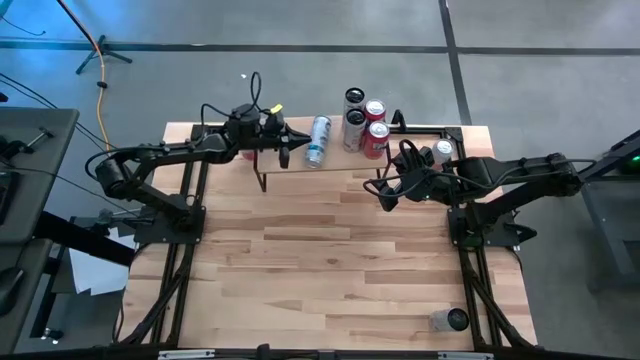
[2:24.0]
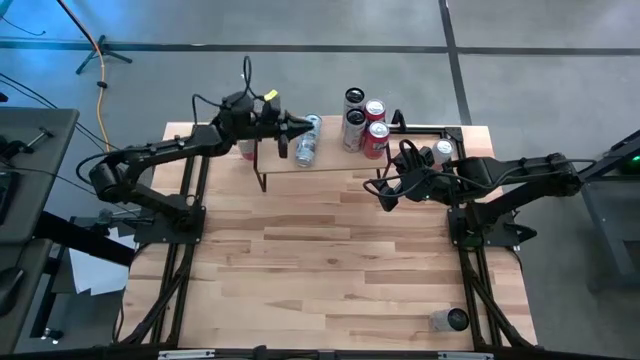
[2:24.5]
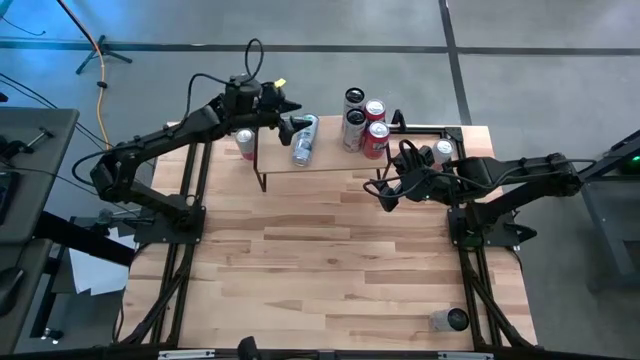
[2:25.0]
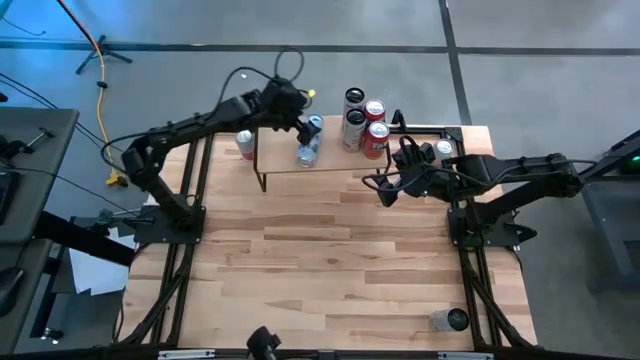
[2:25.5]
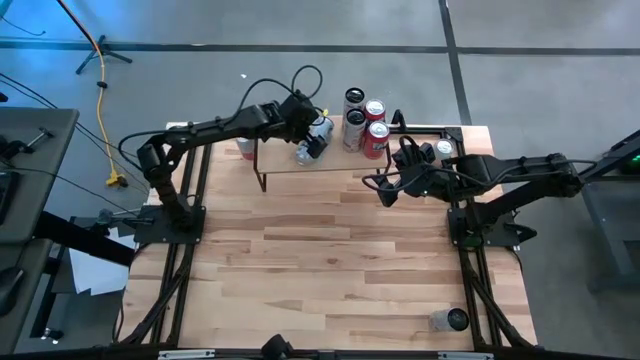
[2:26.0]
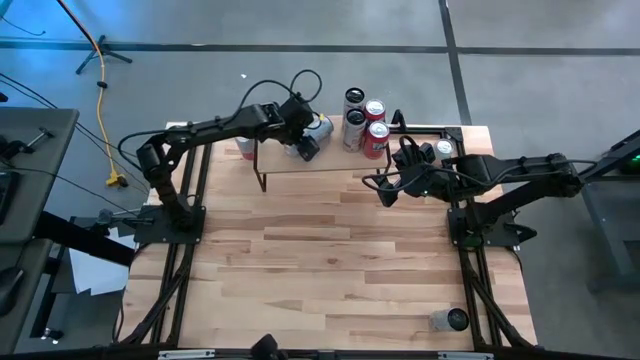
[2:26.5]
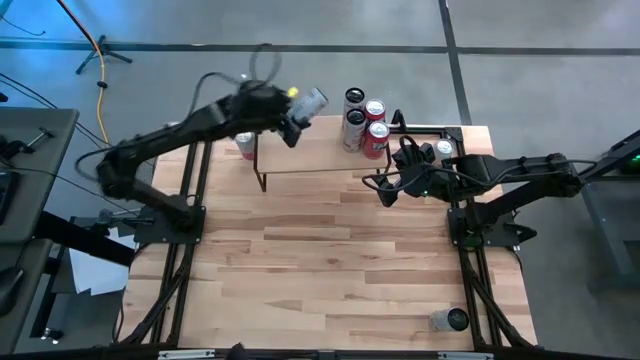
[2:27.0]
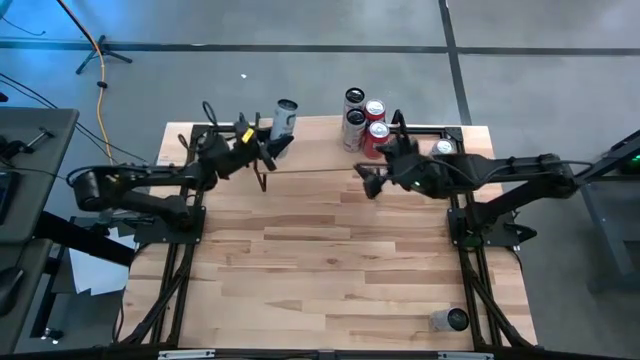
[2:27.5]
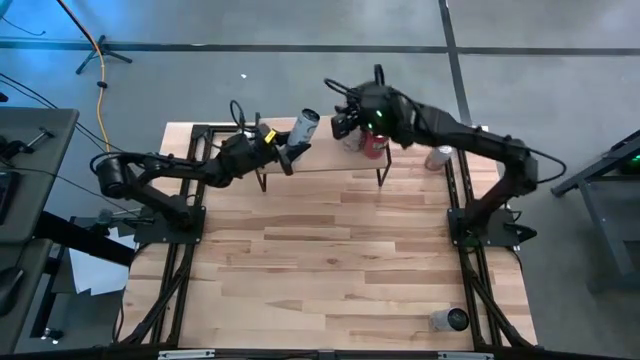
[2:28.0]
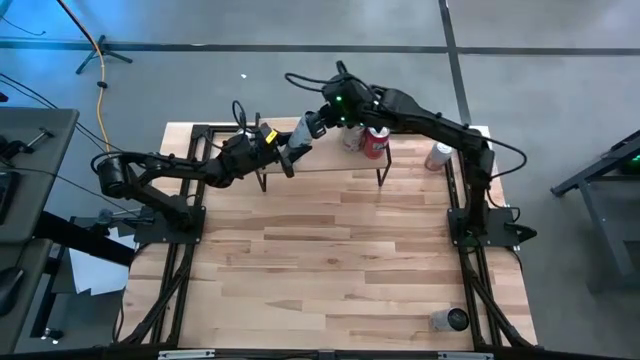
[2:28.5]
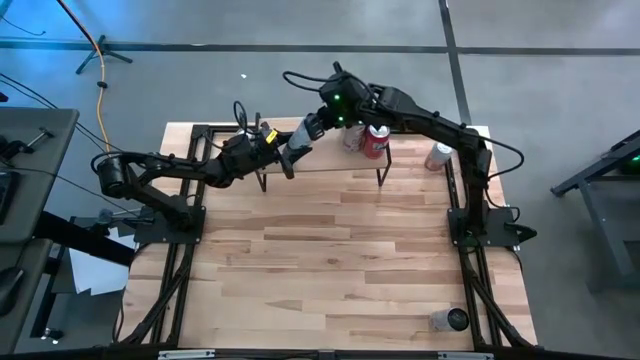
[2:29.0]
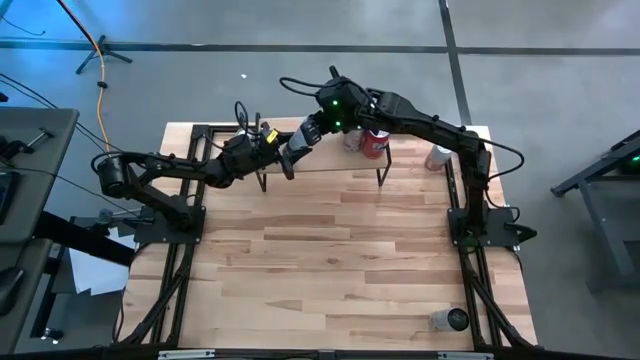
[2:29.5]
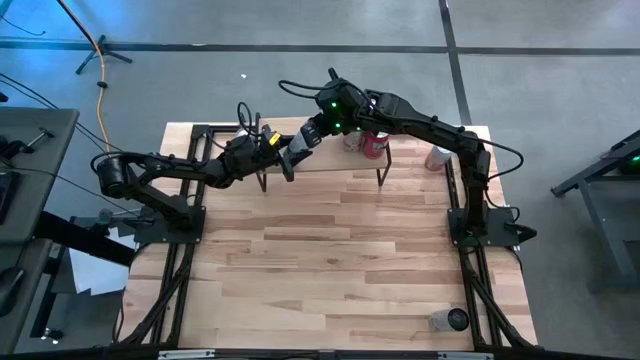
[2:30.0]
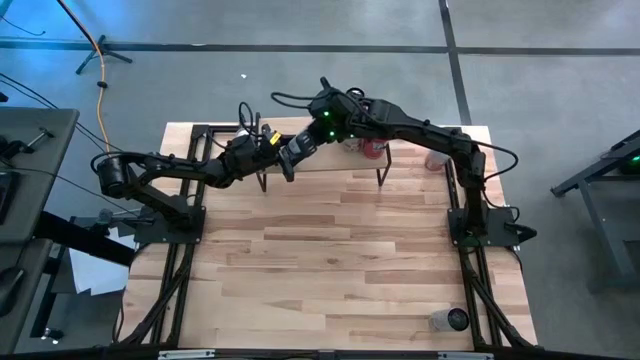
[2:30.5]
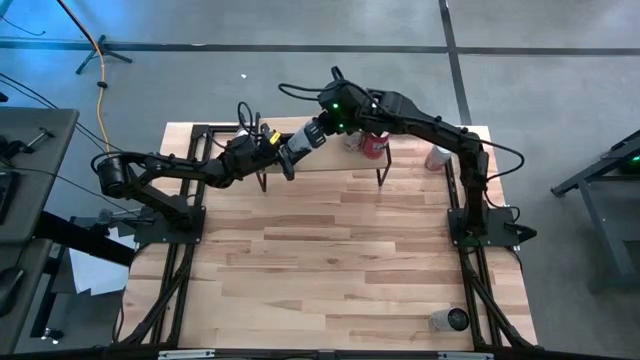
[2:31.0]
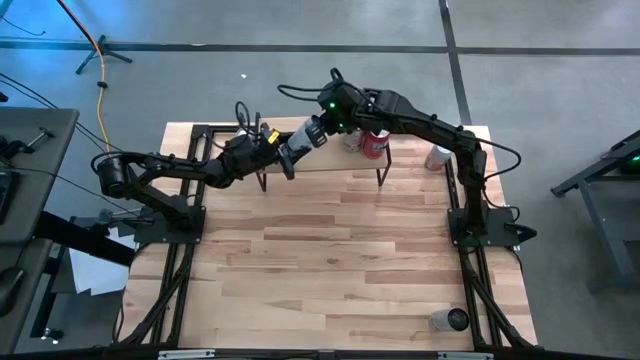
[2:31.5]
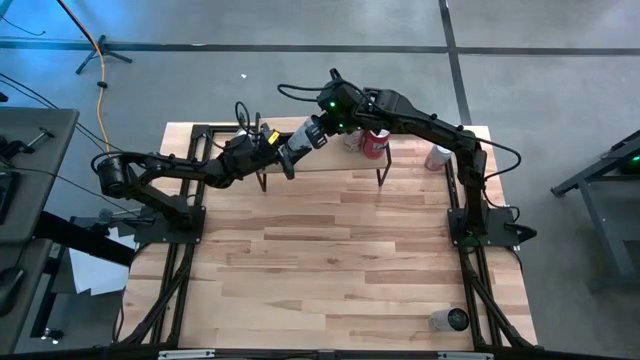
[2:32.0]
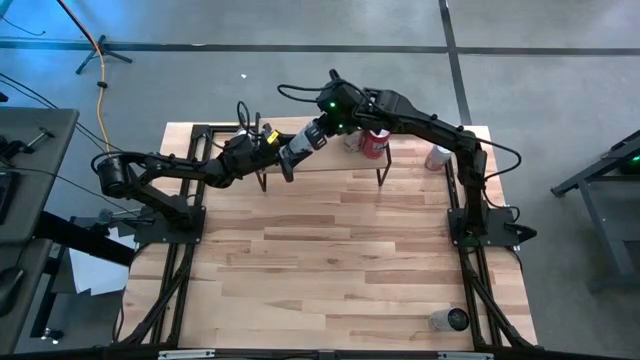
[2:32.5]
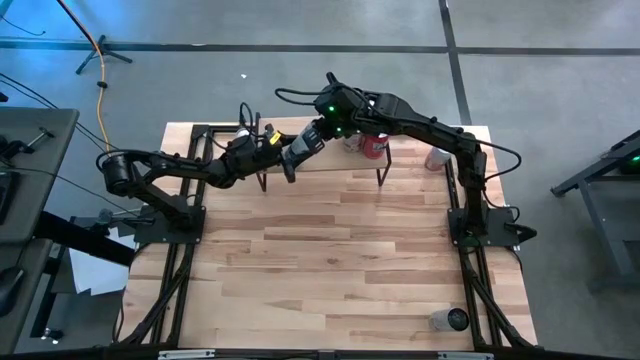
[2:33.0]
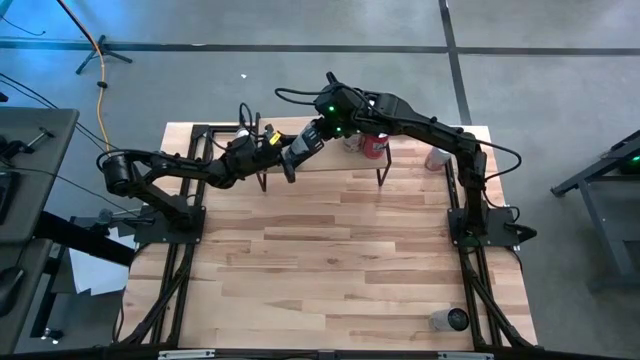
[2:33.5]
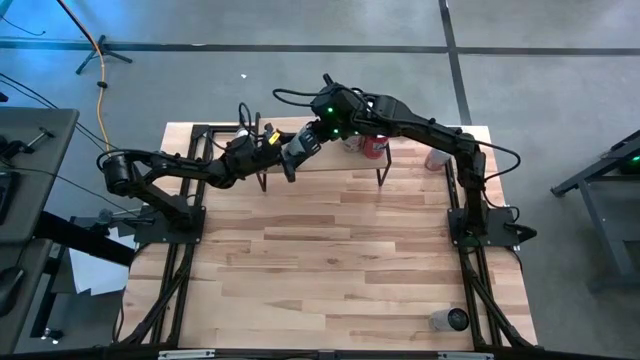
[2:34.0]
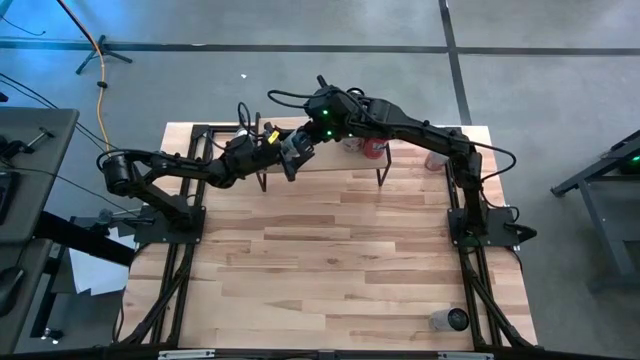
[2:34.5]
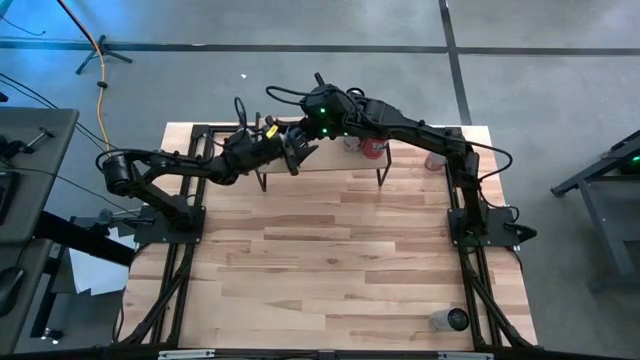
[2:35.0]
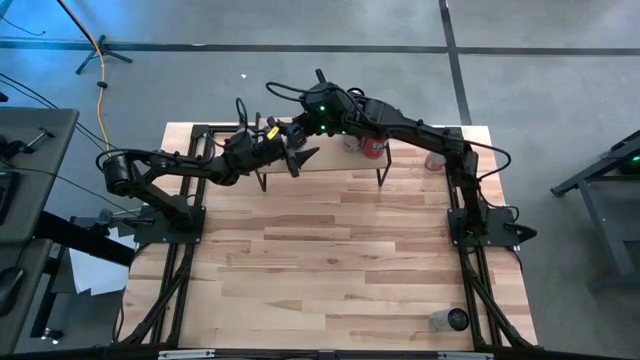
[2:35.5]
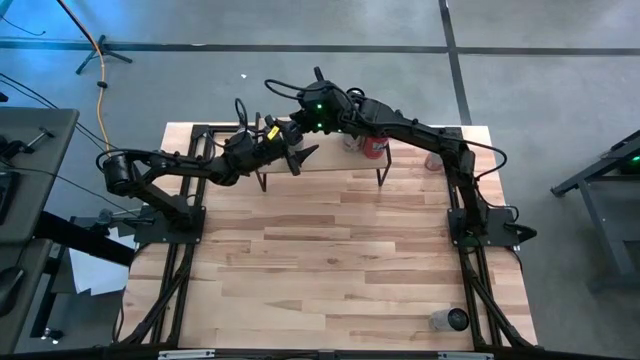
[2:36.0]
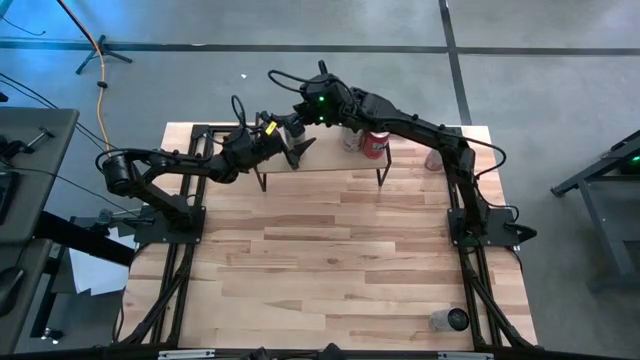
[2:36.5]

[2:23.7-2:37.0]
Task: Place canned beverage on shelf
Put the top black blue soda can on the shelf

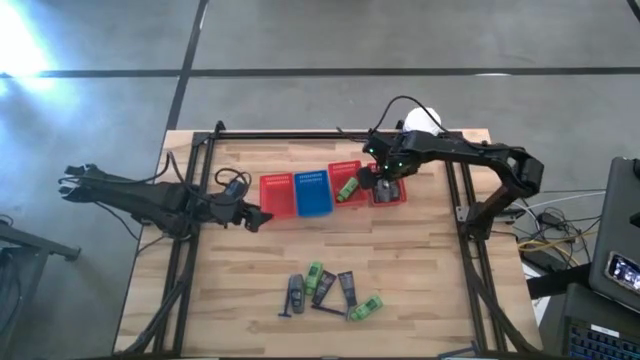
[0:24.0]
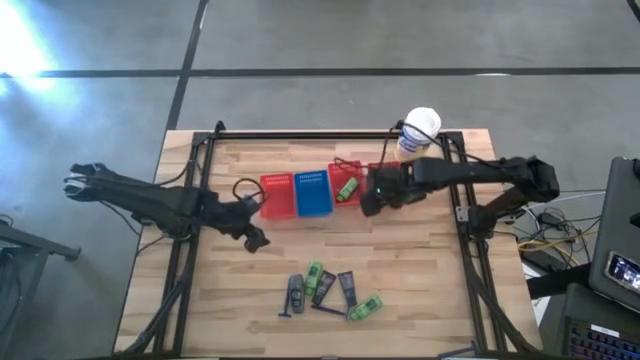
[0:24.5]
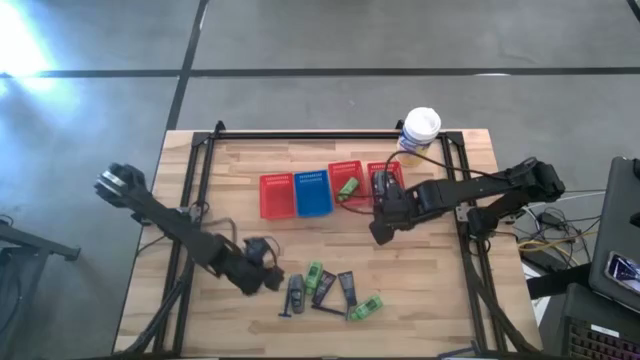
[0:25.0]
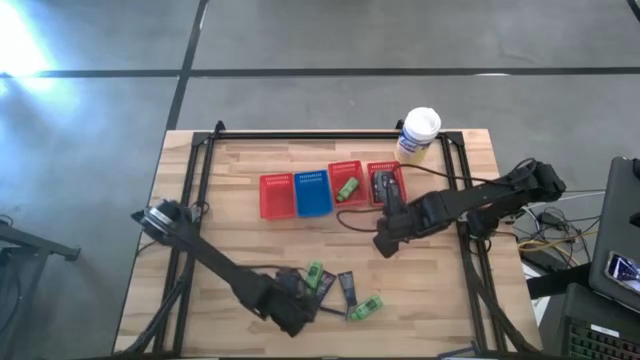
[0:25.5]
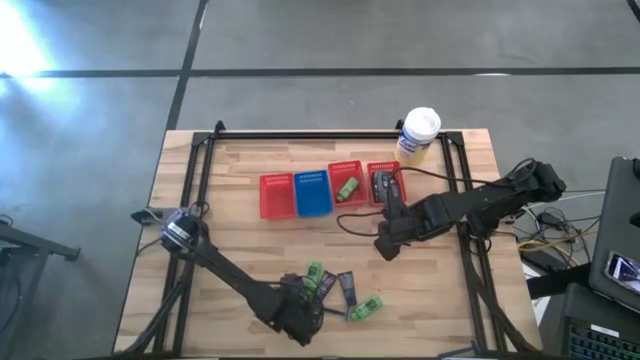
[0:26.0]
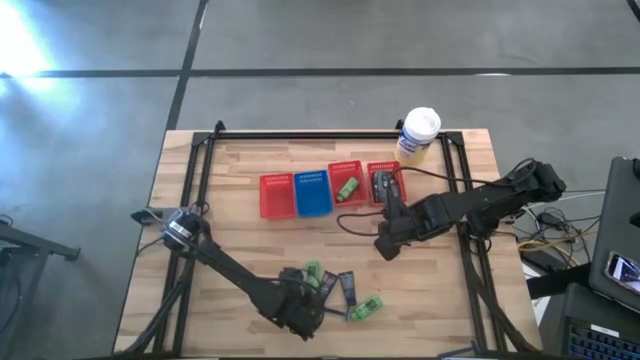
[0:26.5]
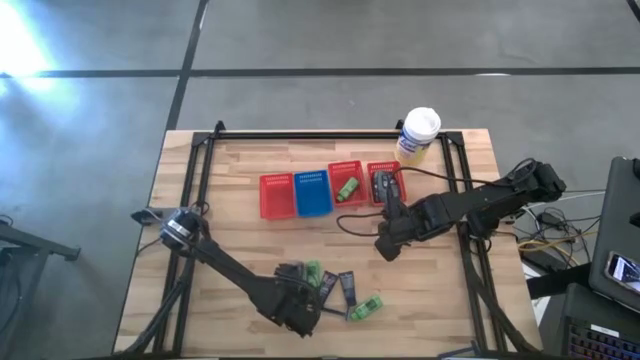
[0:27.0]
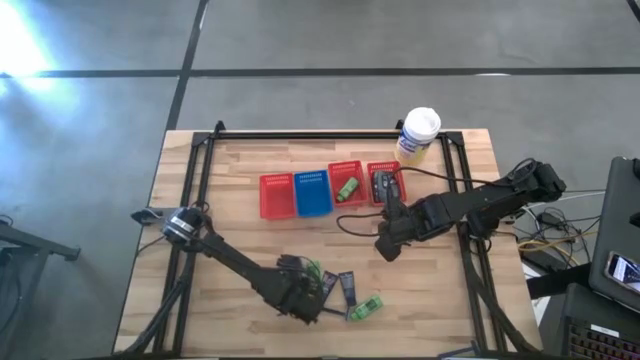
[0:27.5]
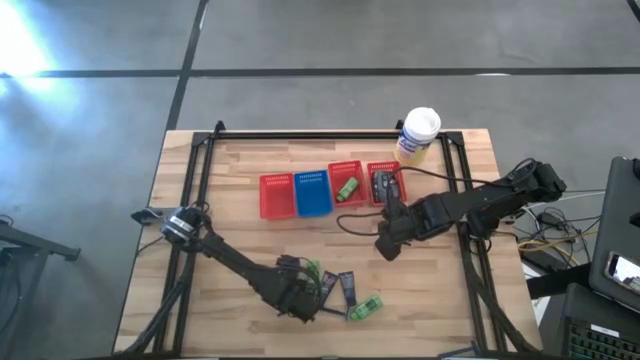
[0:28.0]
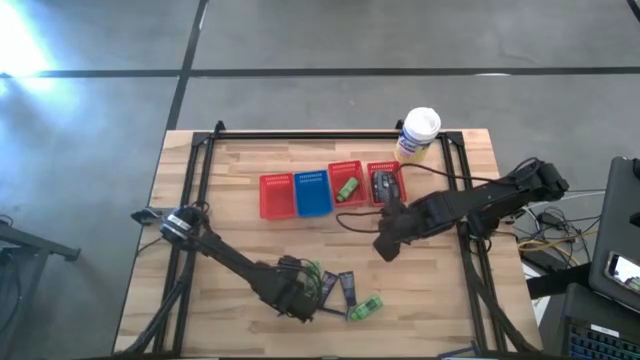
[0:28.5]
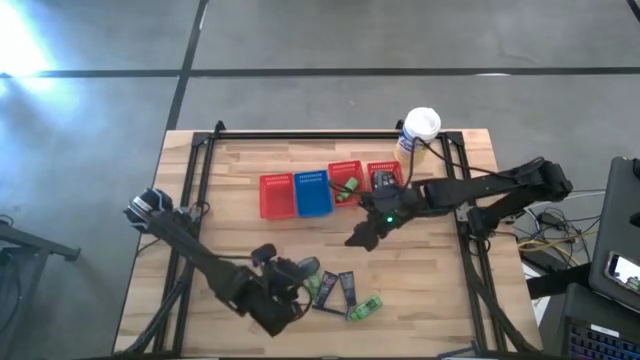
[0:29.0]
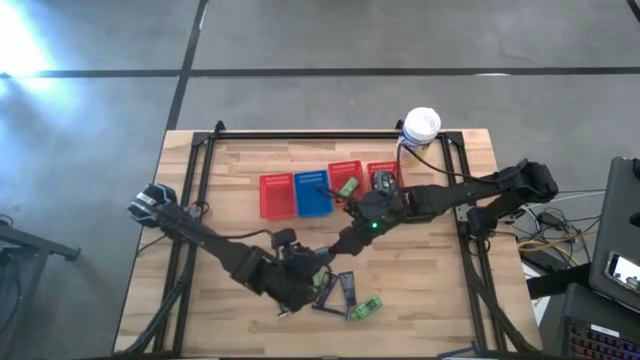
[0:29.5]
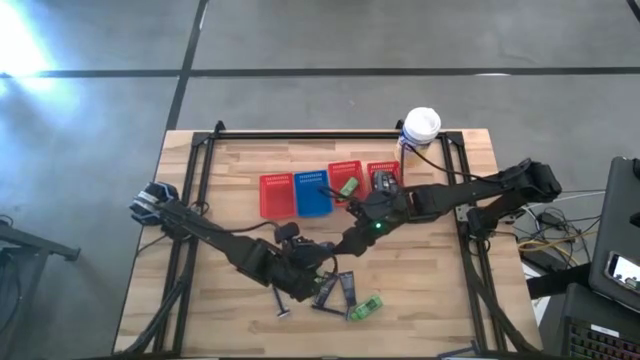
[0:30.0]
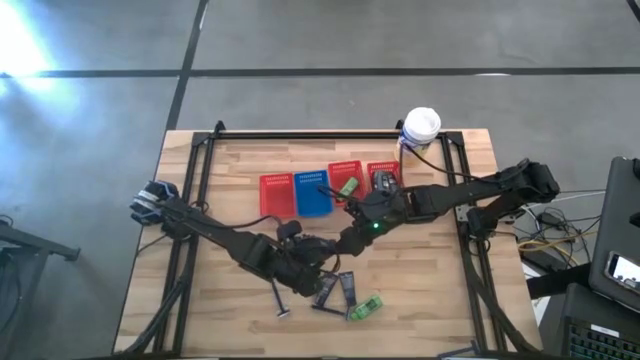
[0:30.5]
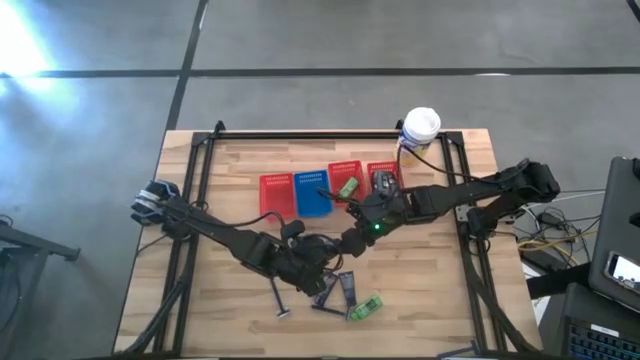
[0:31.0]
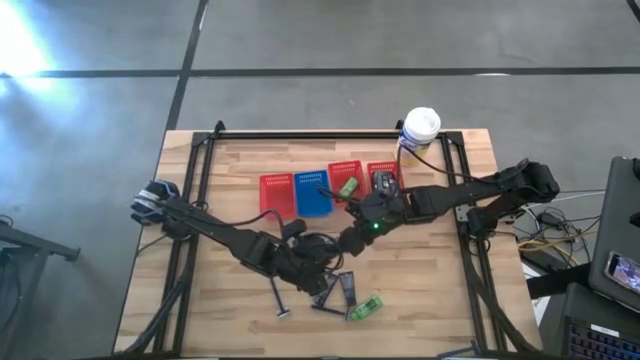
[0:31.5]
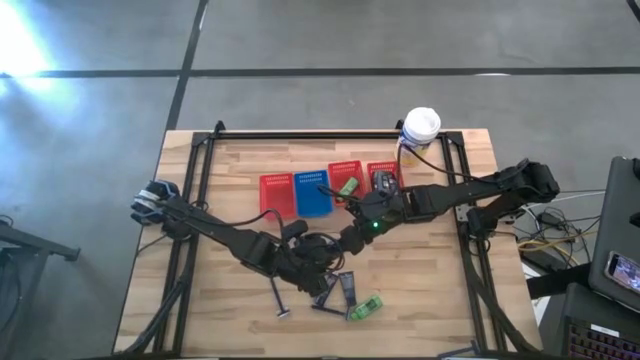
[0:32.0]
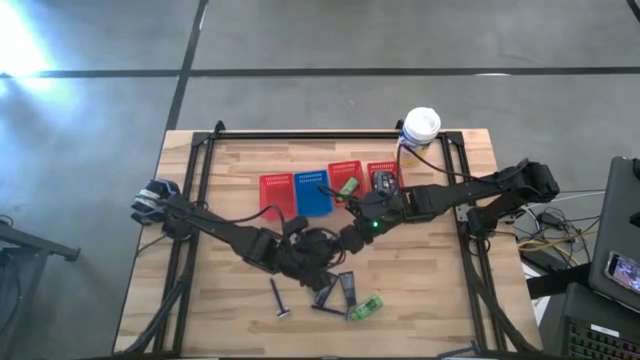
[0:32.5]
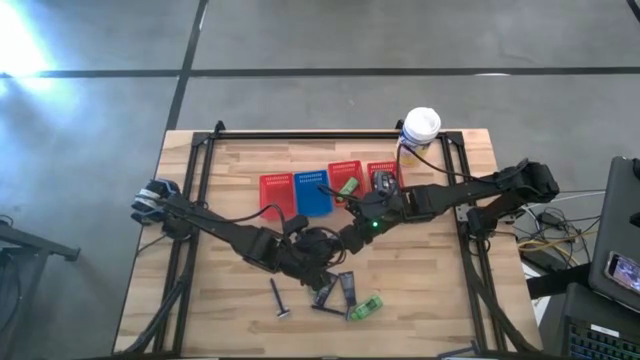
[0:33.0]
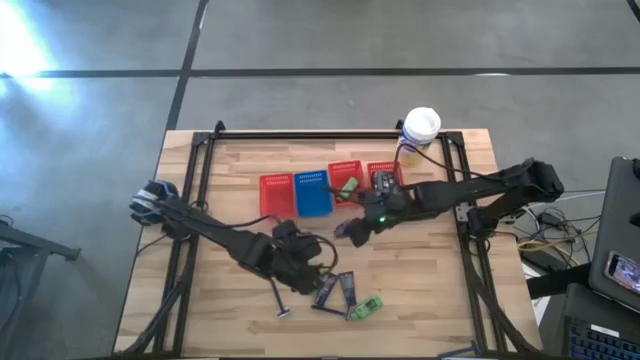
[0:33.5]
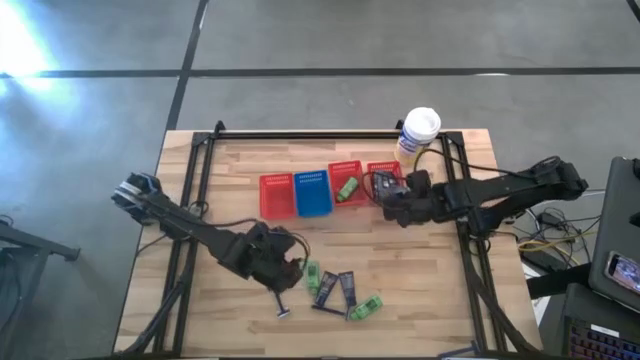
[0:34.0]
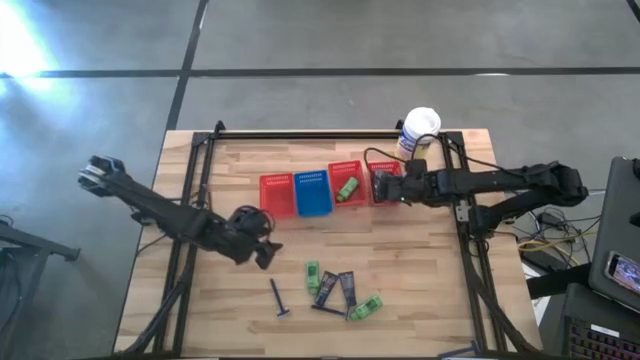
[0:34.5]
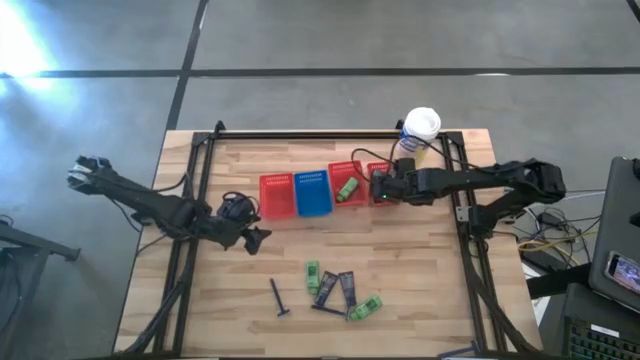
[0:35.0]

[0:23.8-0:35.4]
Task: Pick & Place Travel size toiletries
Put the gray deodorant into the right red bin
